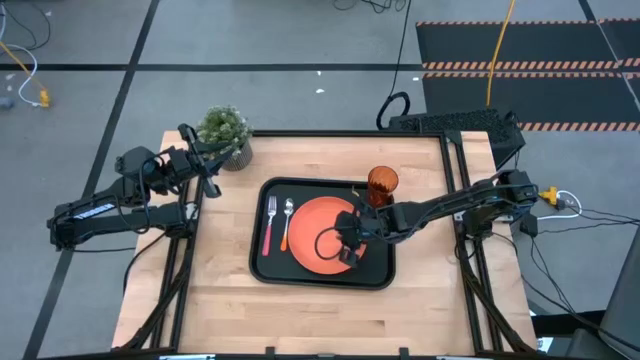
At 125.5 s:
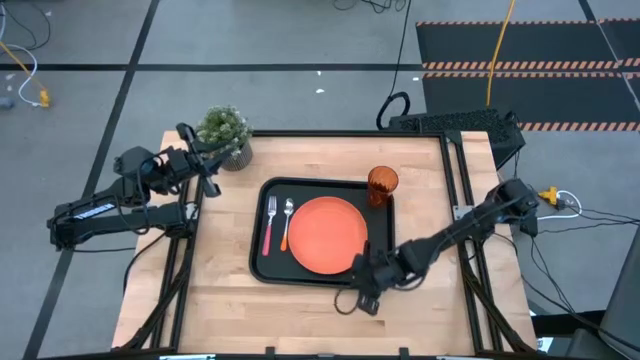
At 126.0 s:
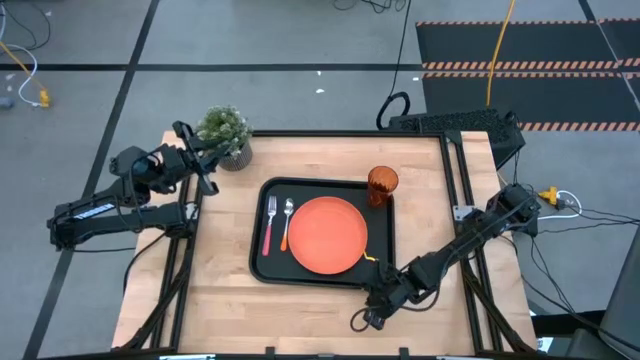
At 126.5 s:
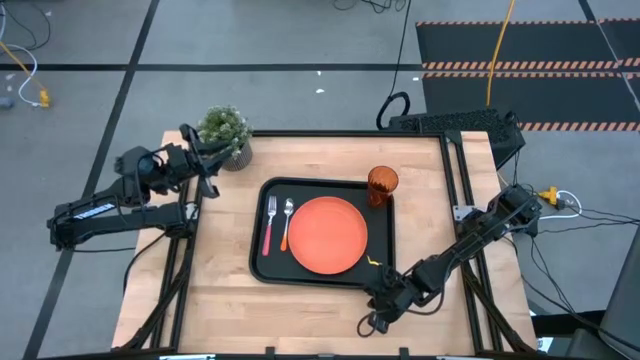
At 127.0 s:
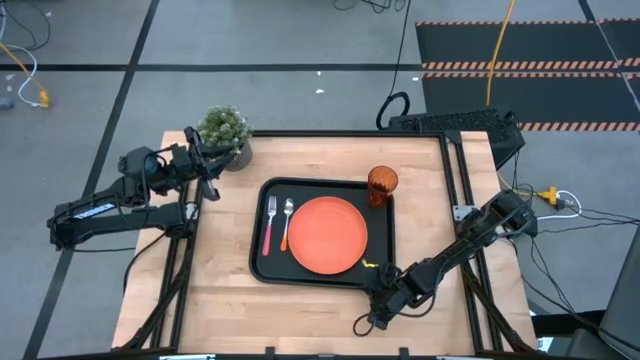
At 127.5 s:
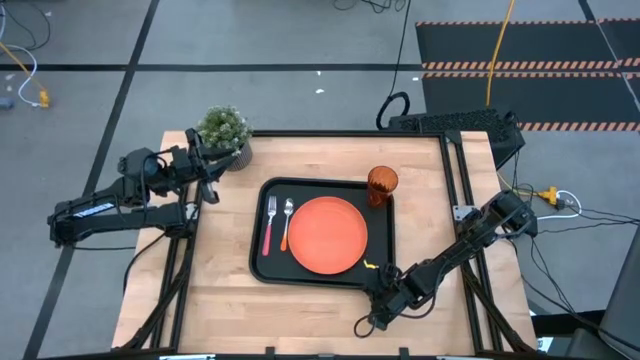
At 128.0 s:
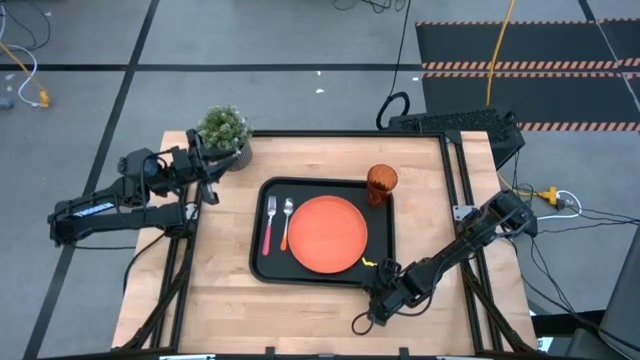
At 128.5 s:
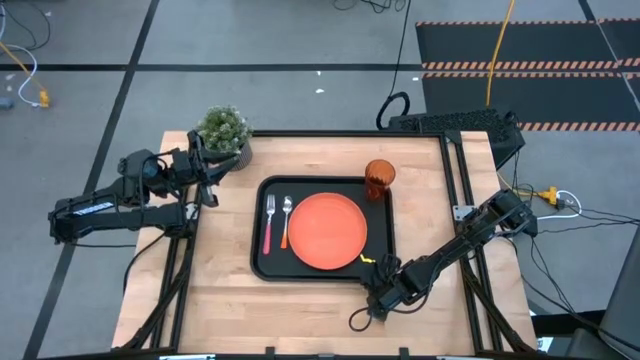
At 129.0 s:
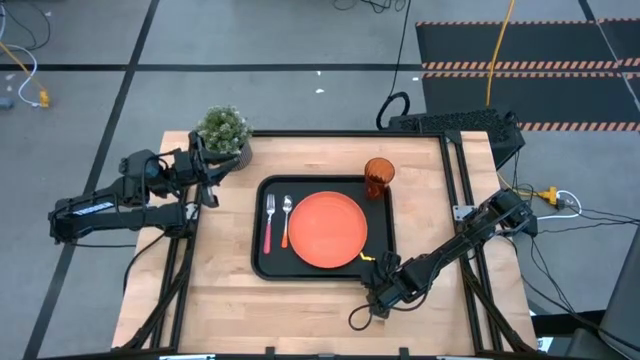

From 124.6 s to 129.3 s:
Task: Pick and place plate/cup/fork/spoon on tray
Adjust the black tray on the table

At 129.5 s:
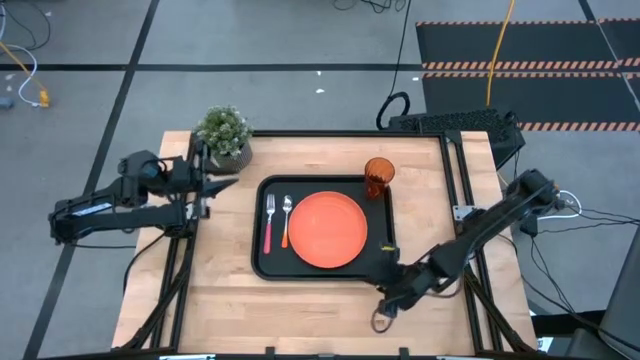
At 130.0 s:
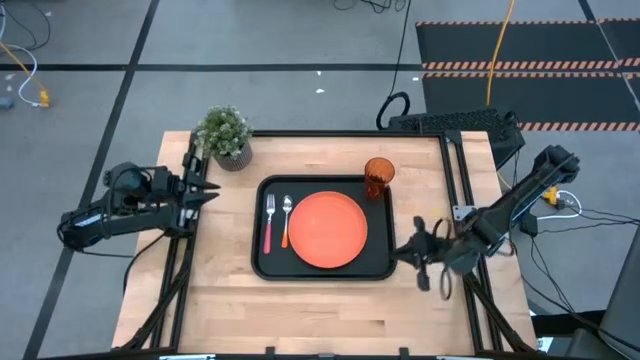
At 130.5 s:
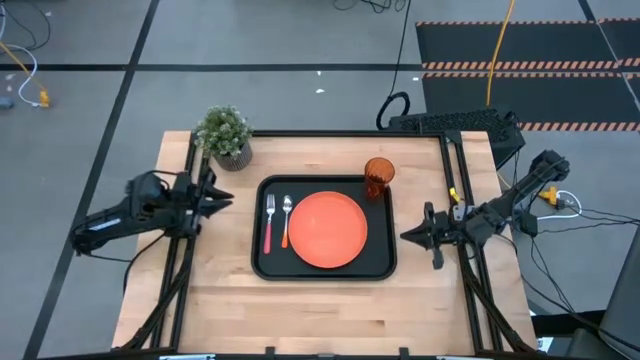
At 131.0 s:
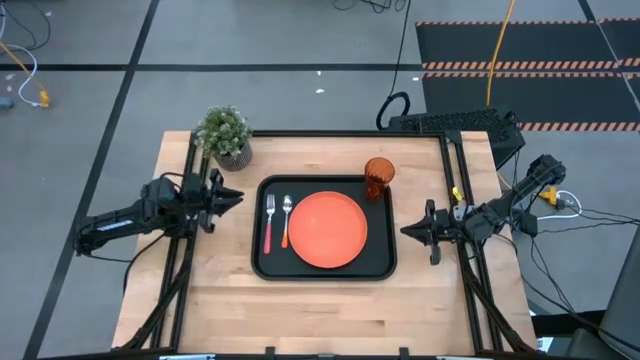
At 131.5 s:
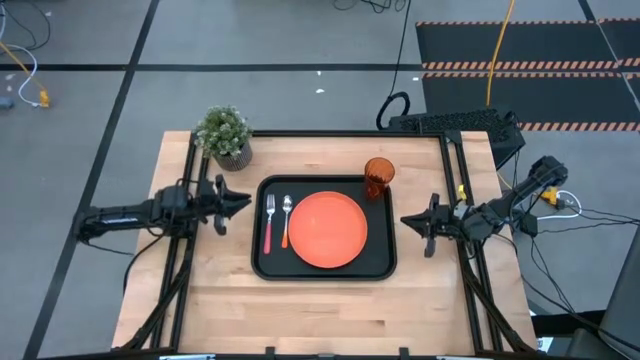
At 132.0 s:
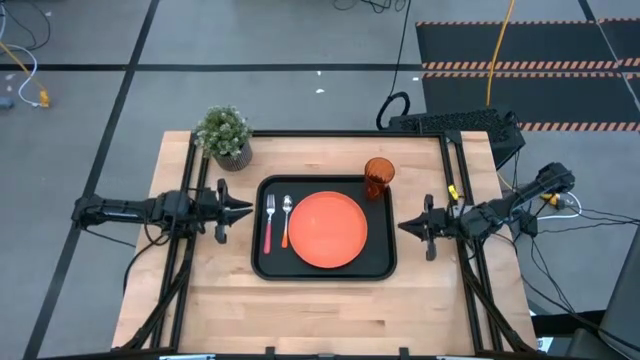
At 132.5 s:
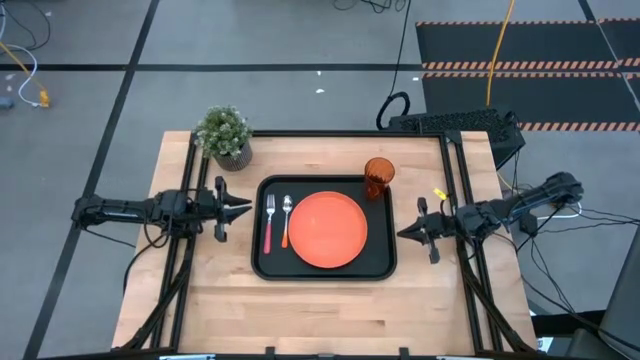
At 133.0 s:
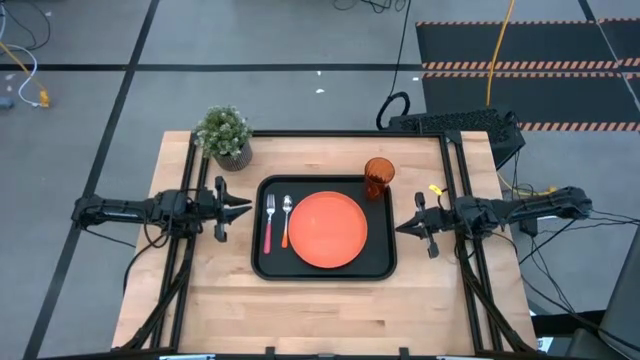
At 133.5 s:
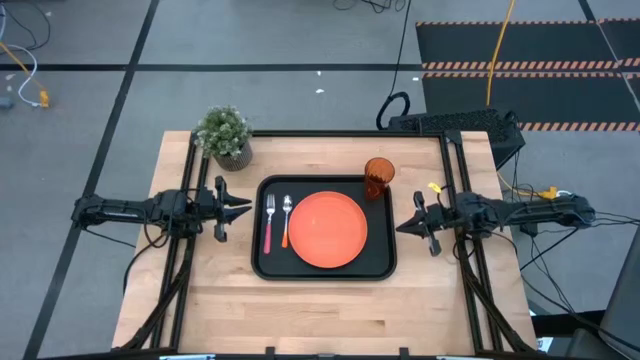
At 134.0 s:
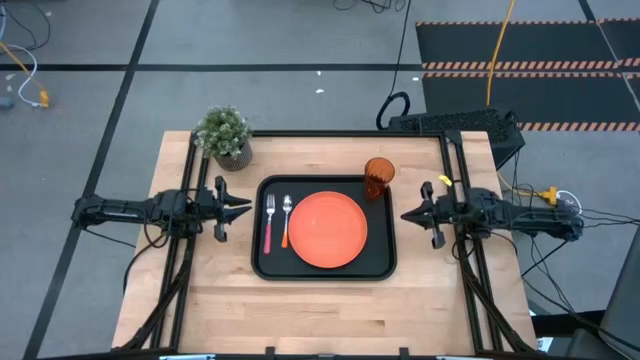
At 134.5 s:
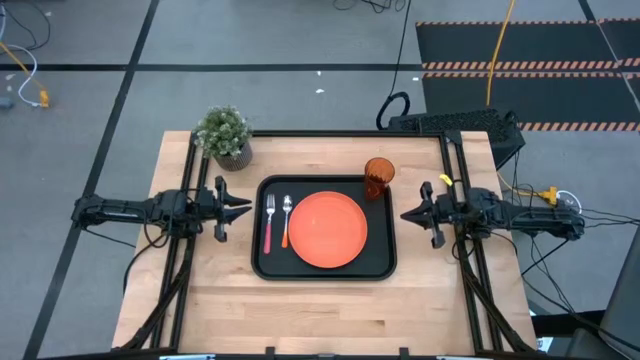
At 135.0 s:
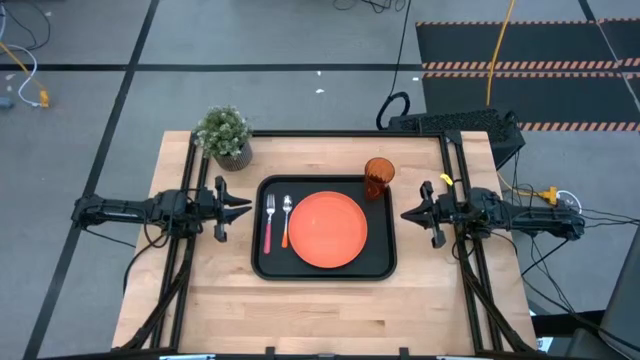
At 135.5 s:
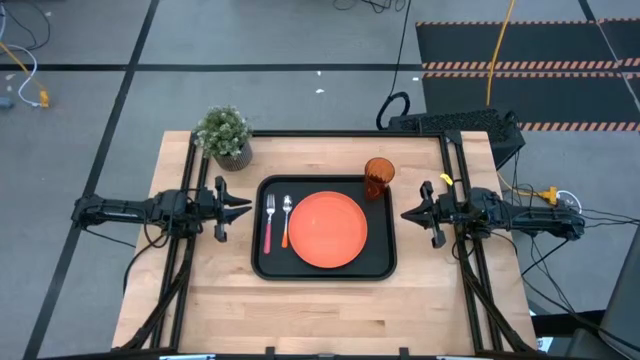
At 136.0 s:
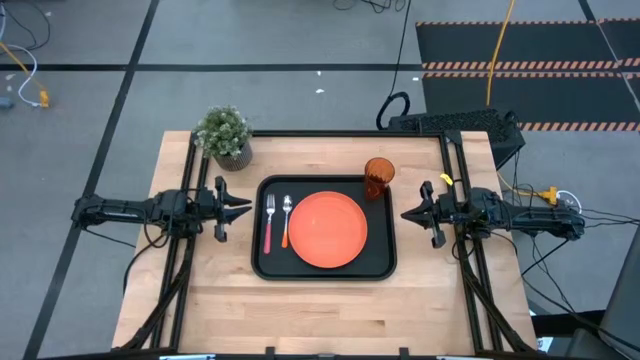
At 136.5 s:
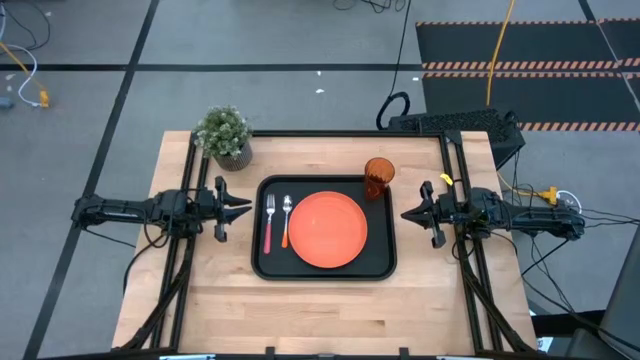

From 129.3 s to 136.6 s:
Return to Home Position

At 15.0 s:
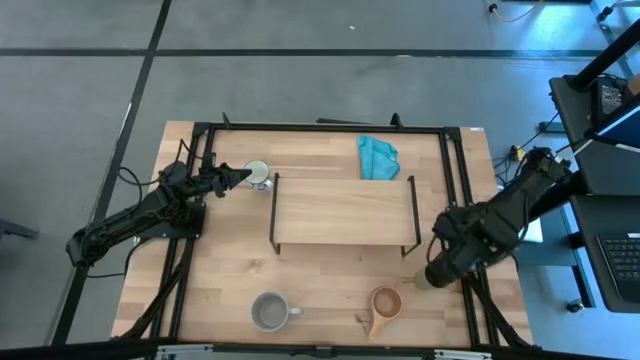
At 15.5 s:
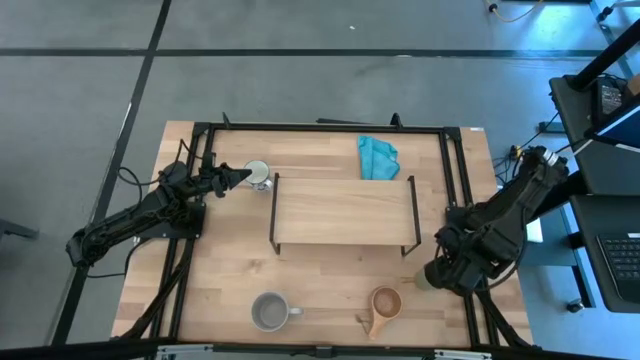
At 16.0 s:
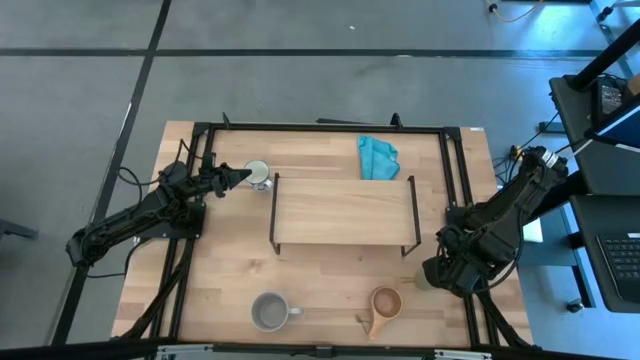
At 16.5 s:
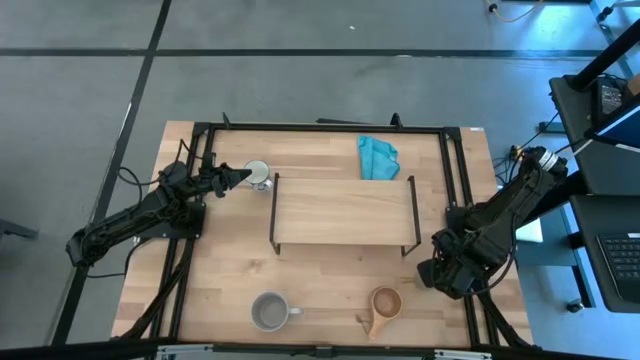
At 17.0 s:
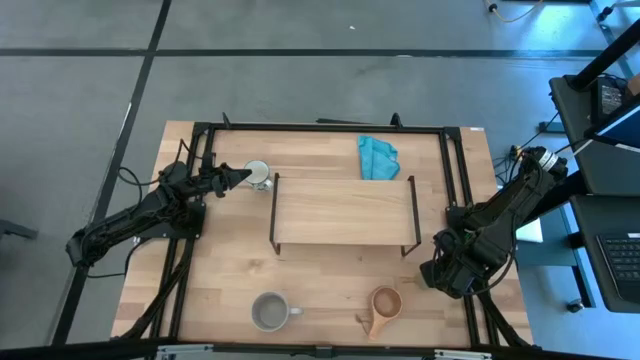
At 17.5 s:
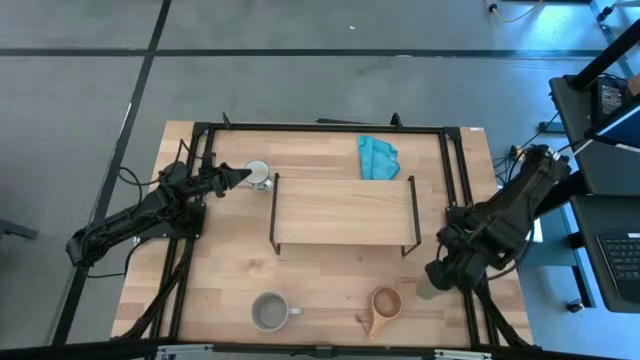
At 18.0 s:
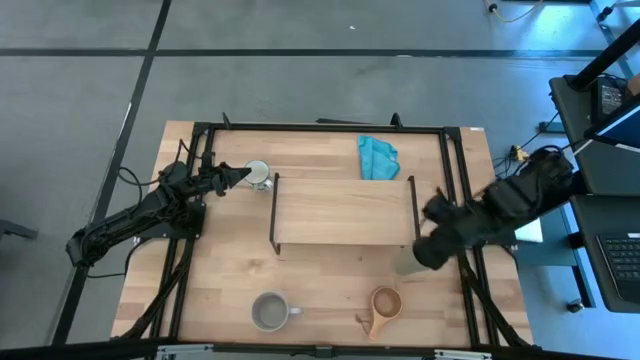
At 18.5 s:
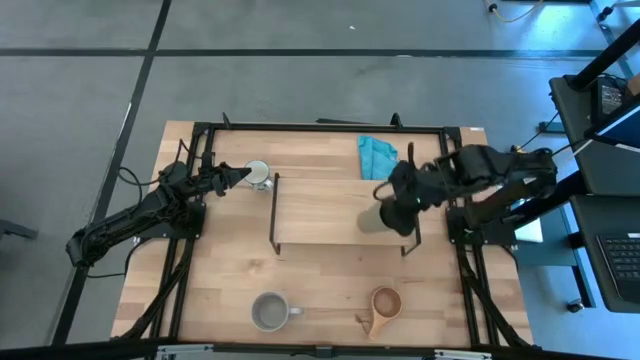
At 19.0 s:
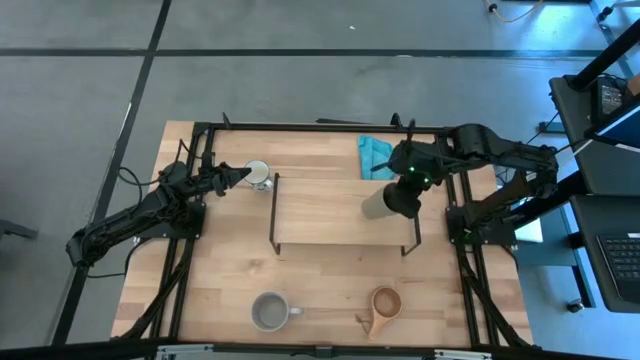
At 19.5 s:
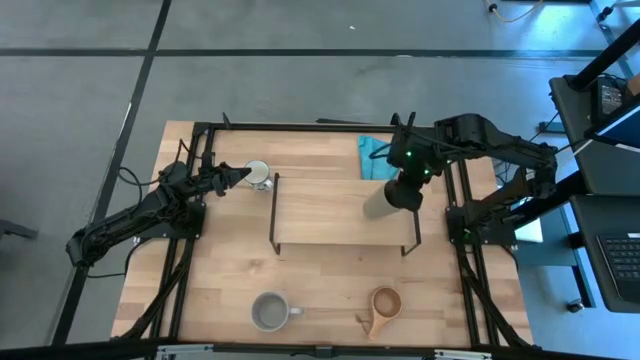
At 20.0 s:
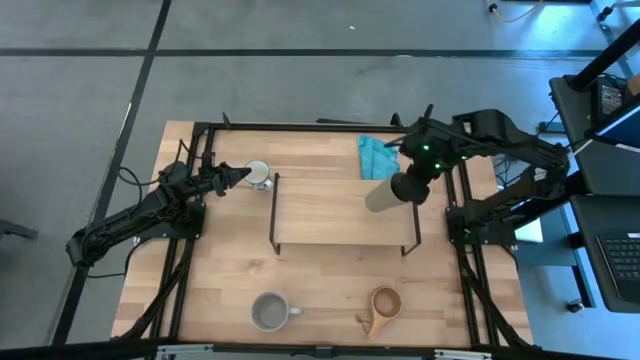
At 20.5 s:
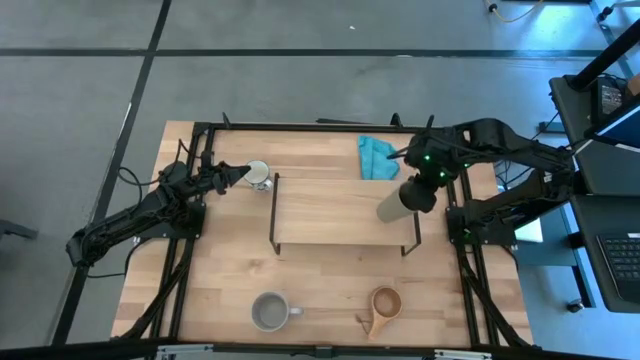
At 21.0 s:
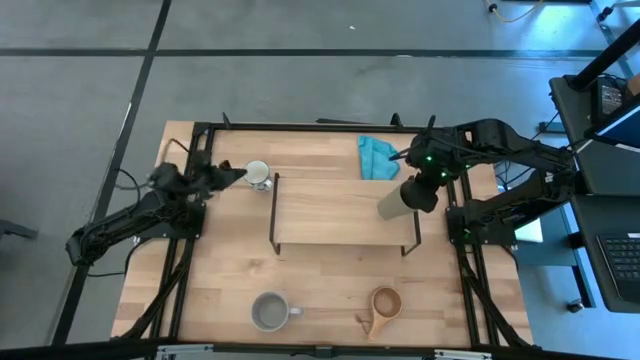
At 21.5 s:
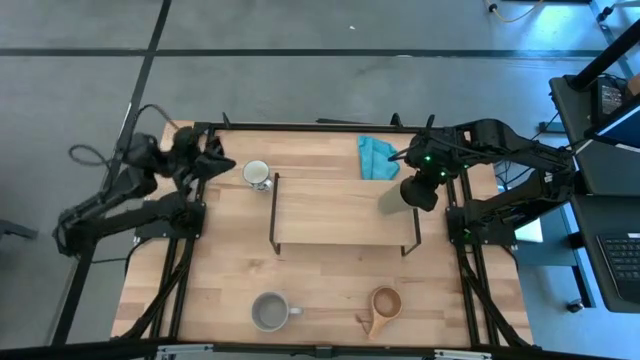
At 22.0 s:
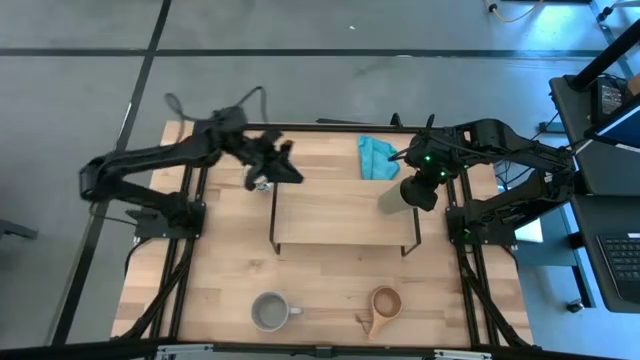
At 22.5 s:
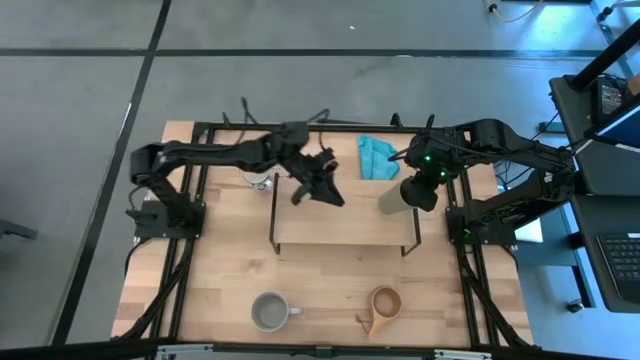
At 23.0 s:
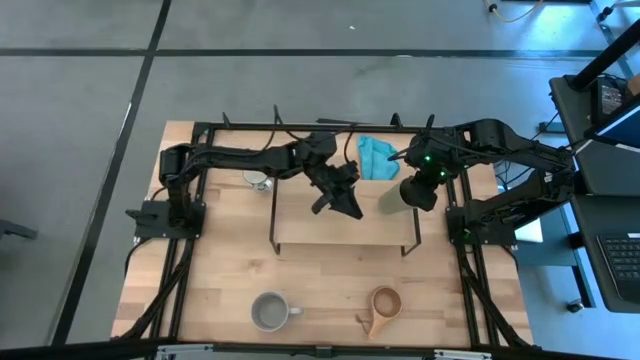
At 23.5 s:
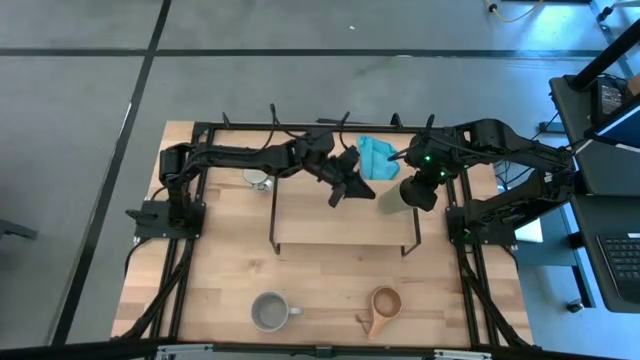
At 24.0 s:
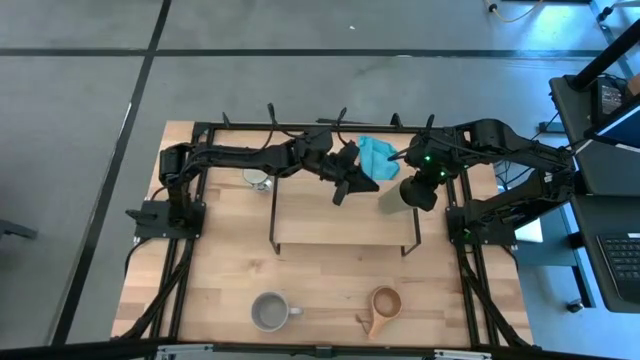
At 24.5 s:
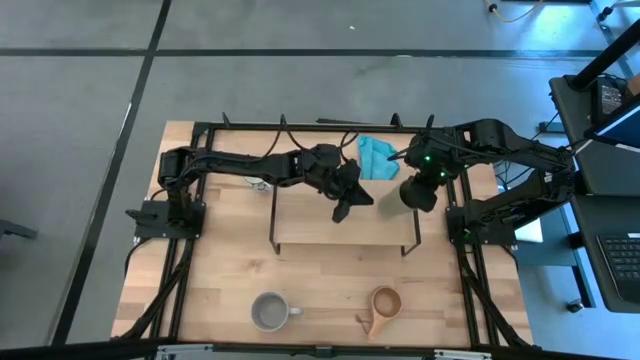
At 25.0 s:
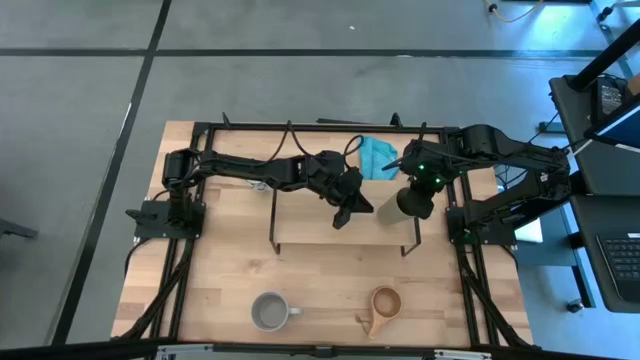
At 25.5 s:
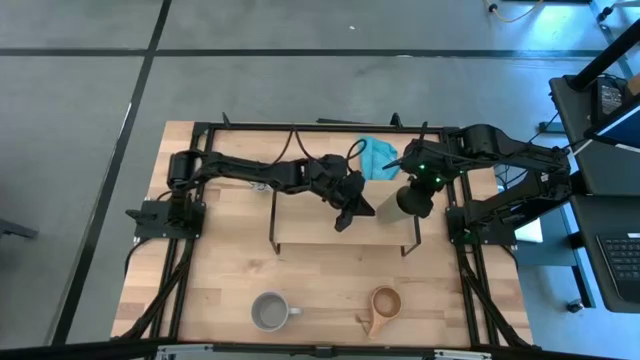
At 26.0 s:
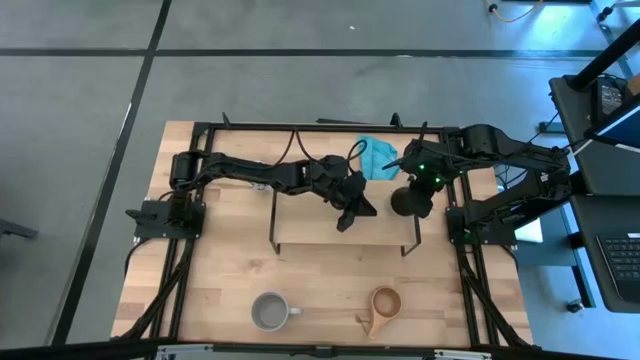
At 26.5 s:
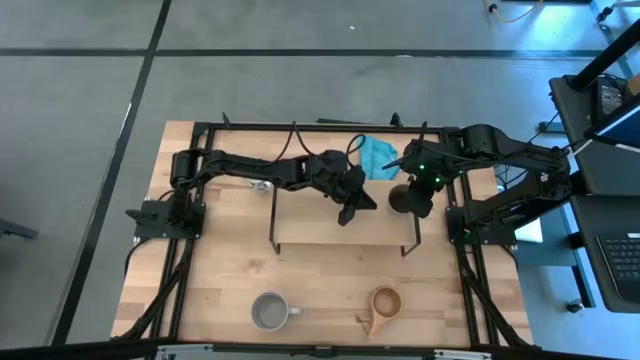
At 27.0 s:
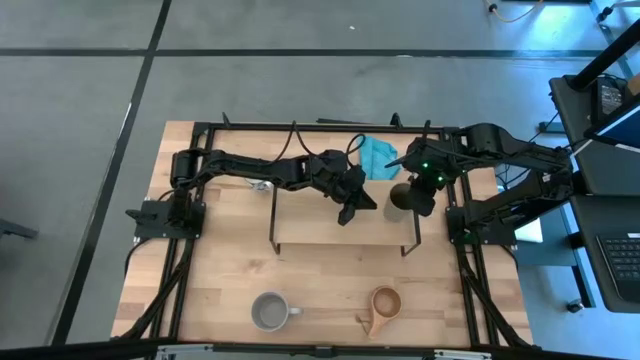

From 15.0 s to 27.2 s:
Task: Stack small to large cups/mugs on shelf
Put the gray cup on the shelf
